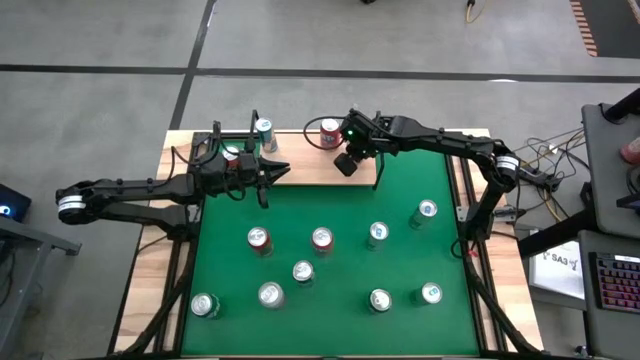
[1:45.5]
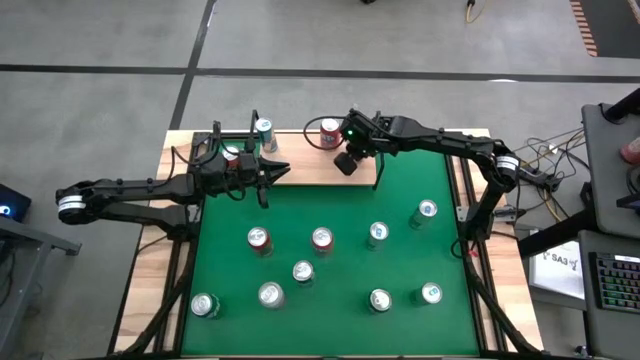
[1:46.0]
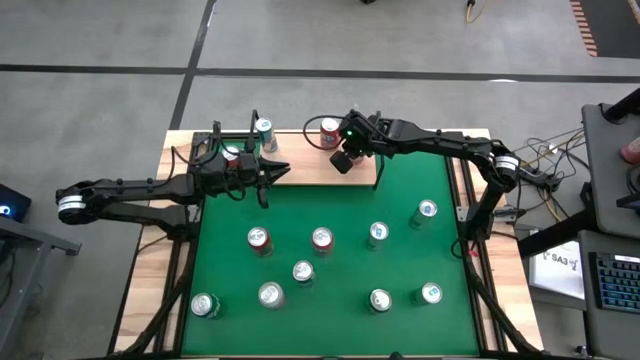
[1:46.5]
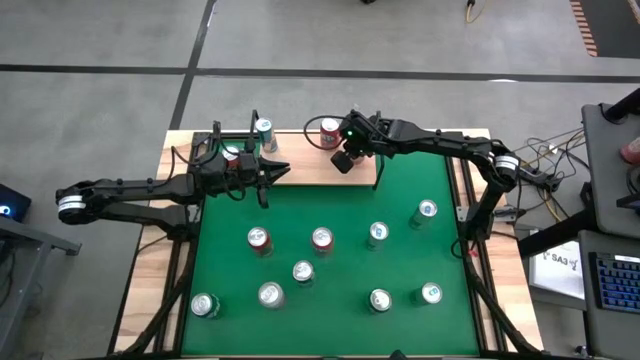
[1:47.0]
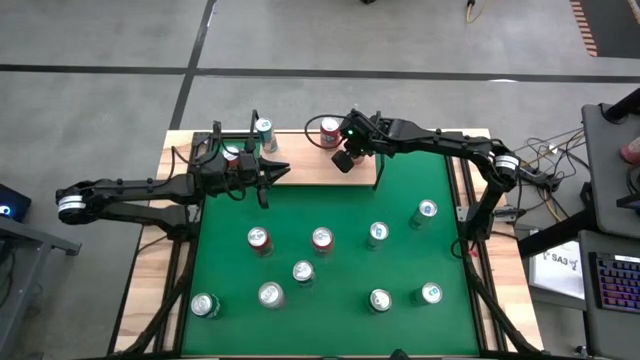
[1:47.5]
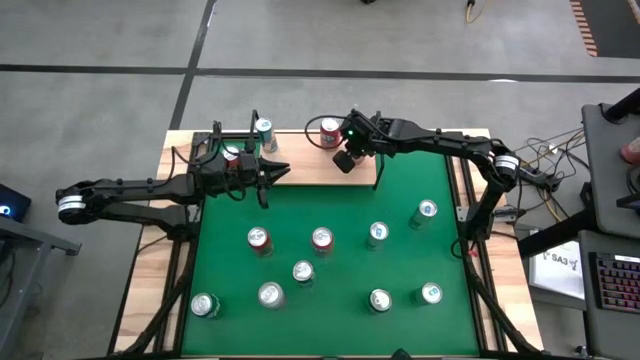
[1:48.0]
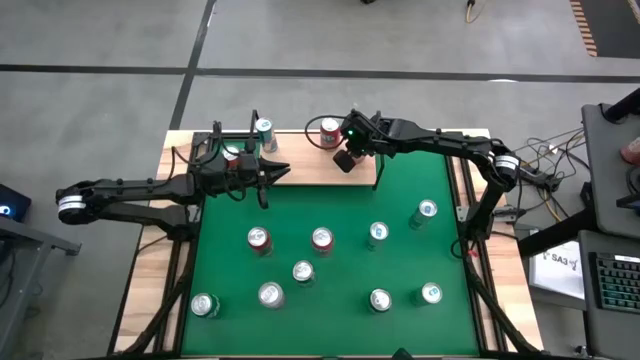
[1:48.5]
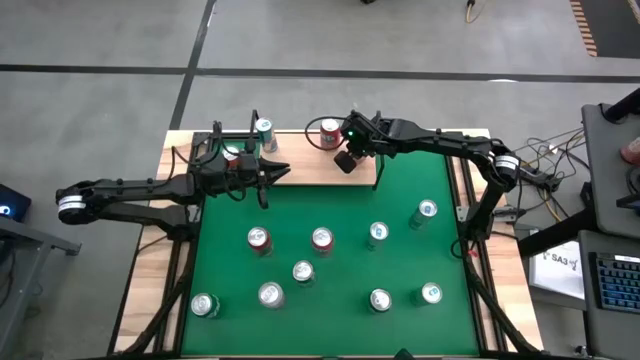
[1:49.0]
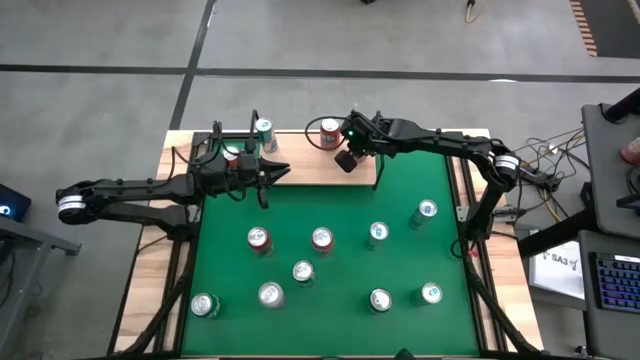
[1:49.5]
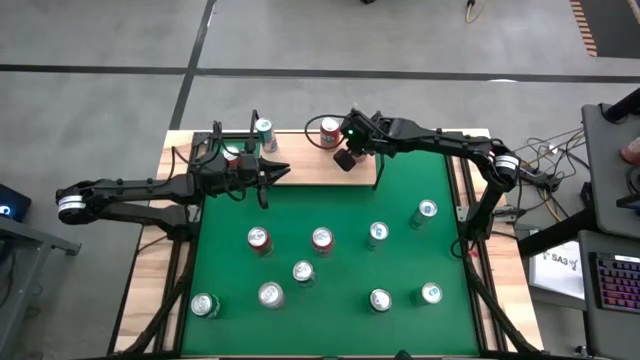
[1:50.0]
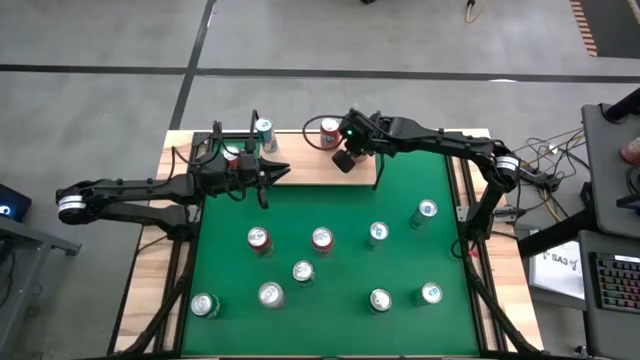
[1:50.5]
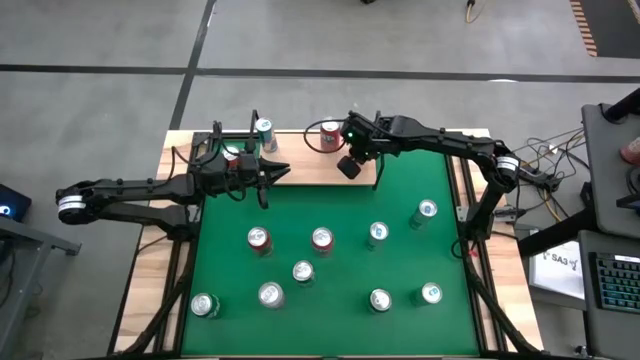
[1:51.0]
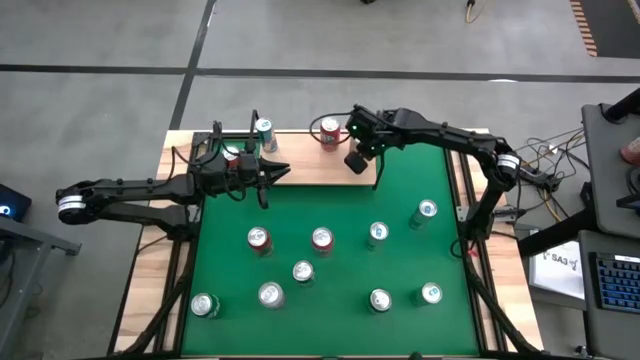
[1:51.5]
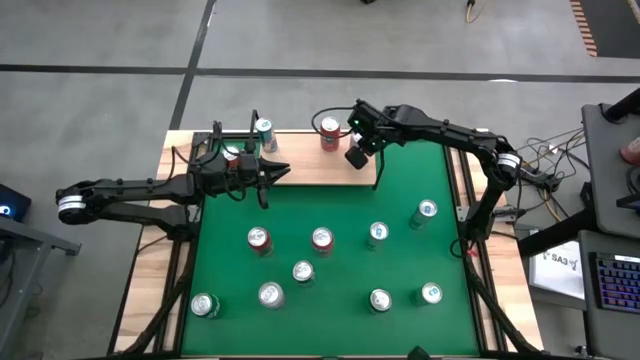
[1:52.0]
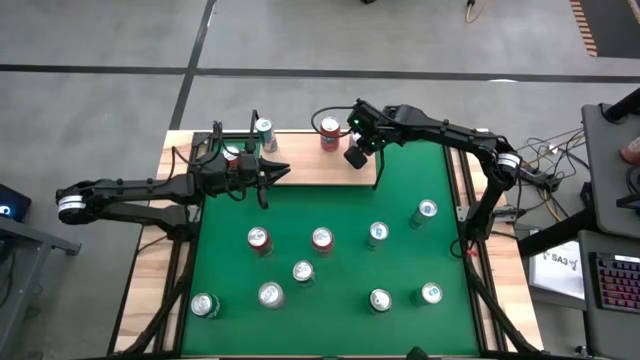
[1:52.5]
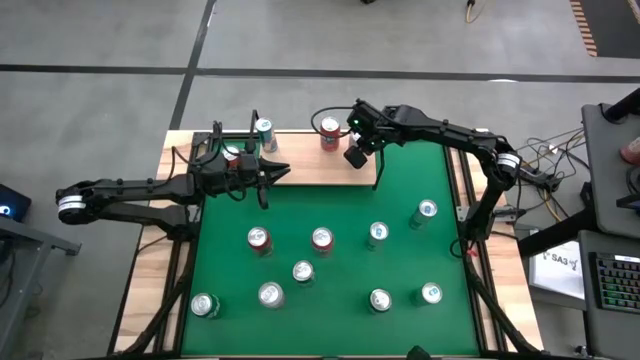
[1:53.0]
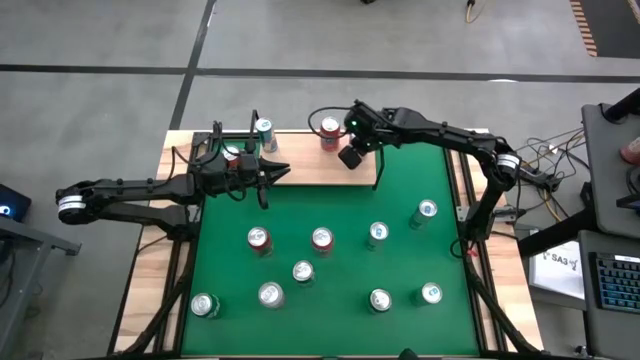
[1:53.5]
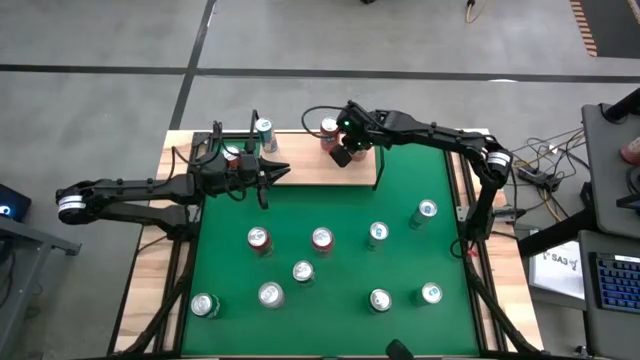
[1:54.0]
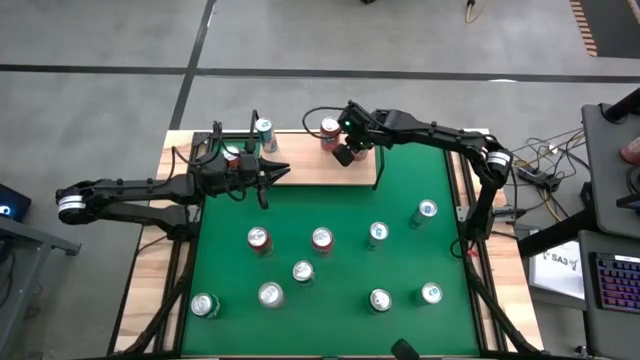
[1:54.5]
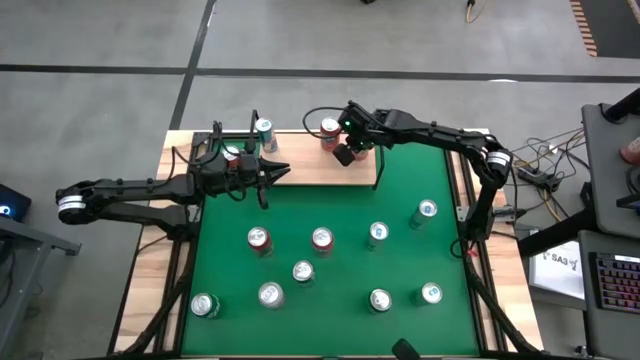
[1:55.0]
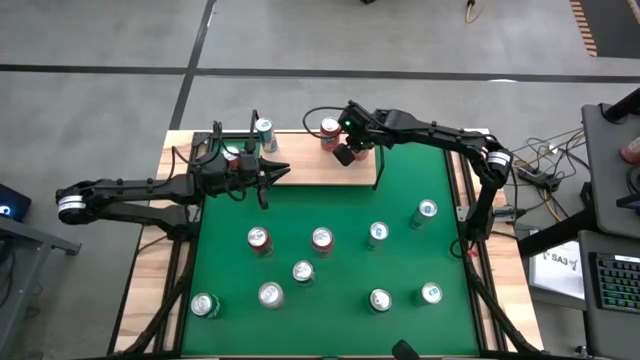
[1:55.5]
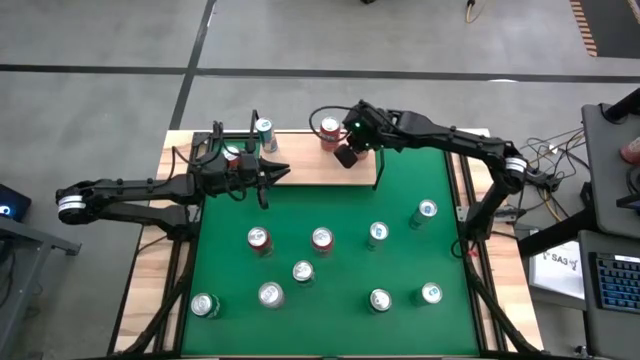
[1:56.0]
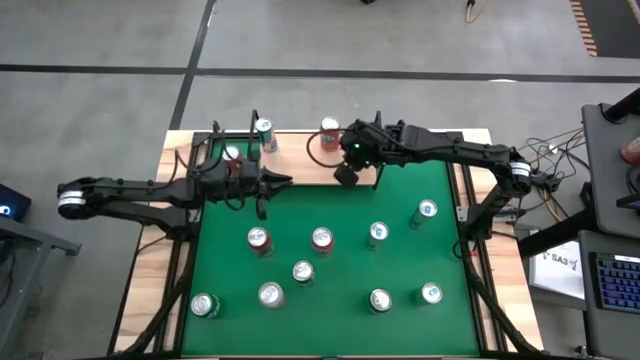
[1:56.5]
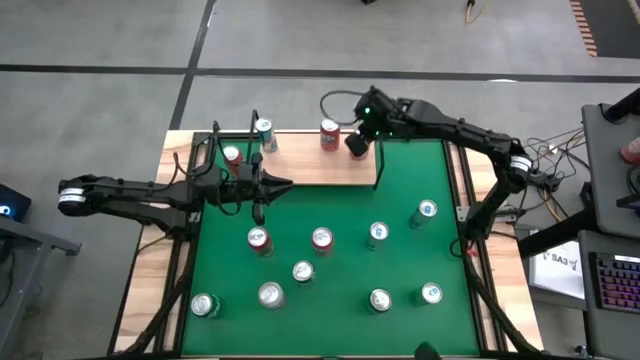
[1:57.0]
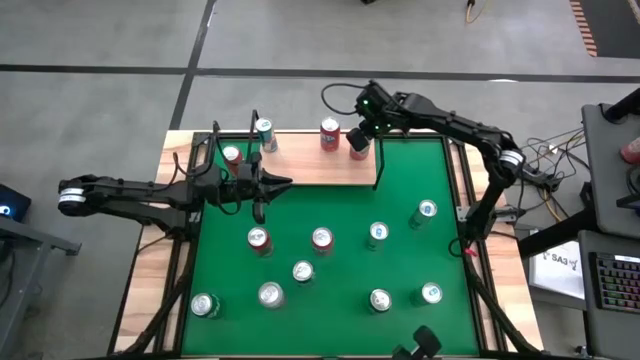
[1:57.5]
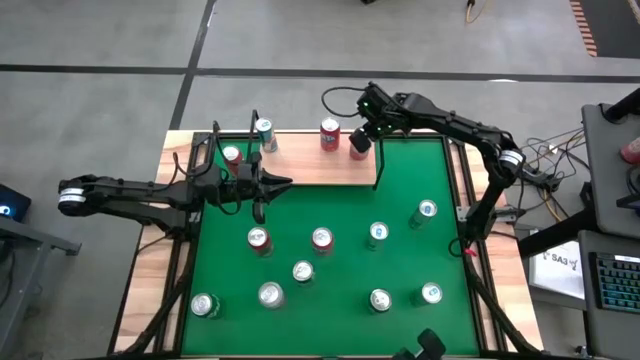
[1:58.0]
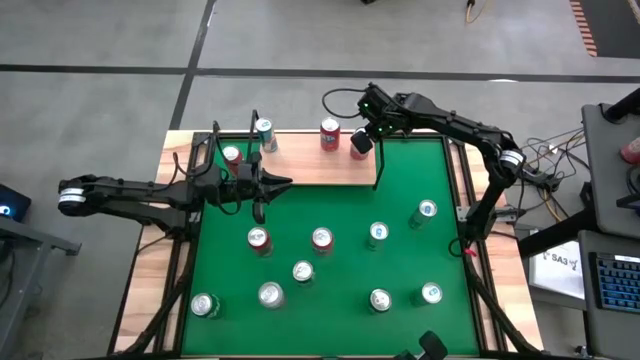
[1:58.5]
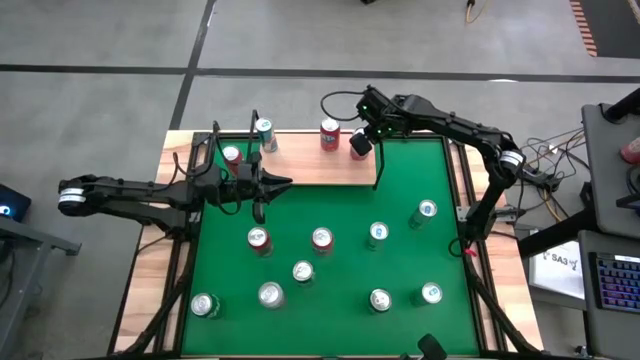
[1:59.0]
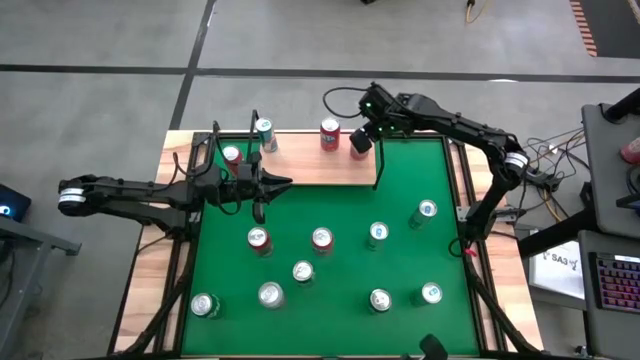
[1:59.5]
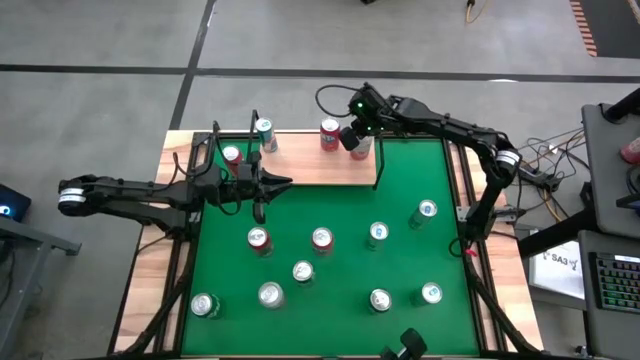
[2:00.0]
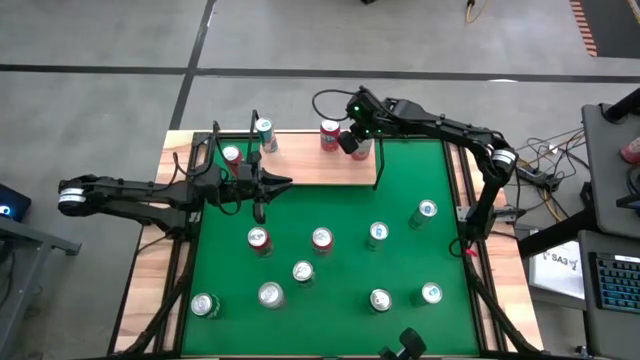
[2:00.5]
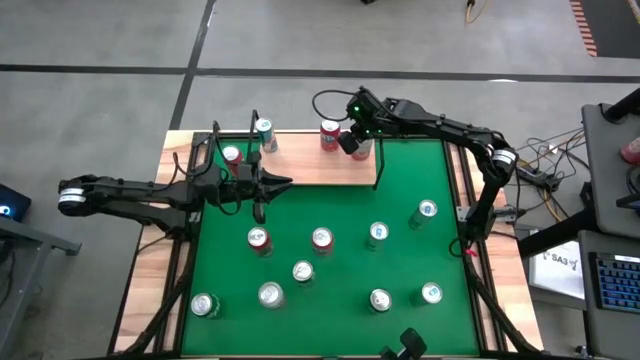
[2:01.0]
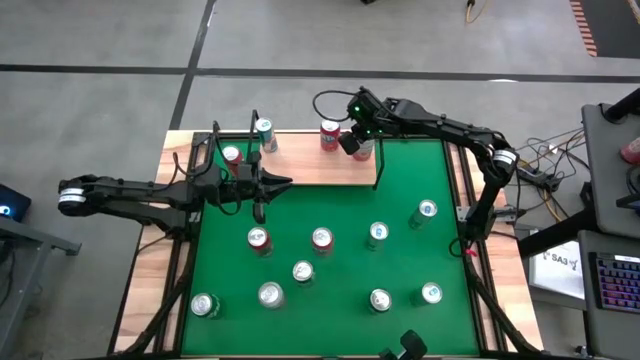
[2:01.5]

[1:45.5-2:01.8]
Task: Pick and place cans onto a shelf
Put the right pink white soda can on the shelf

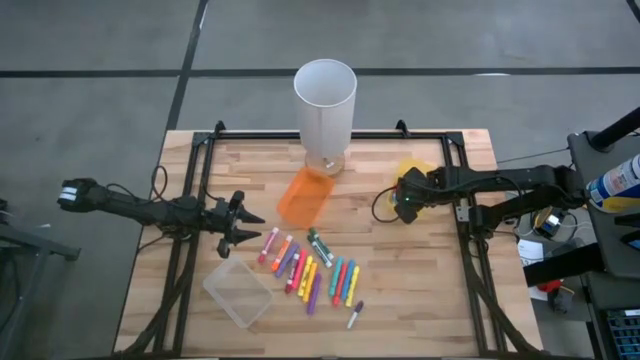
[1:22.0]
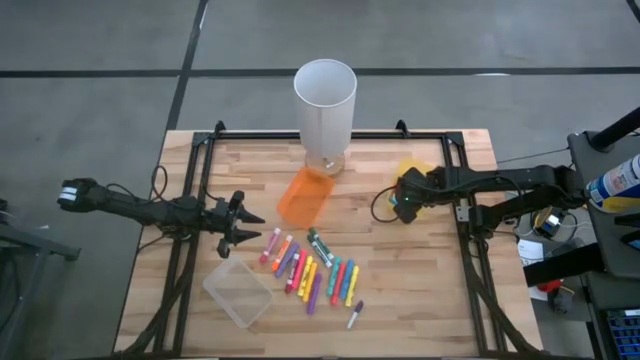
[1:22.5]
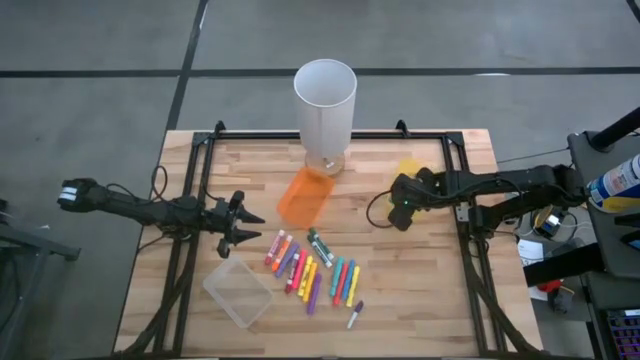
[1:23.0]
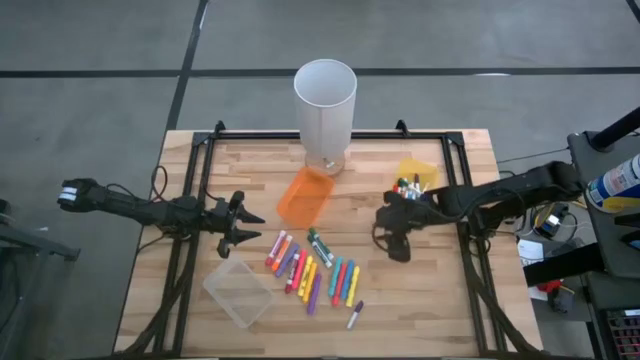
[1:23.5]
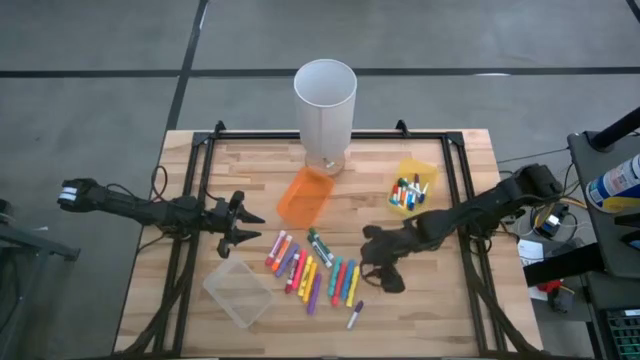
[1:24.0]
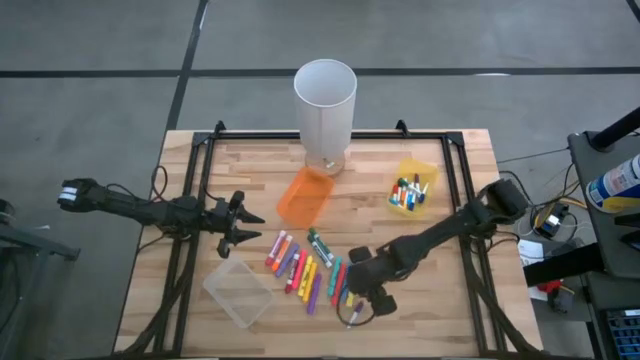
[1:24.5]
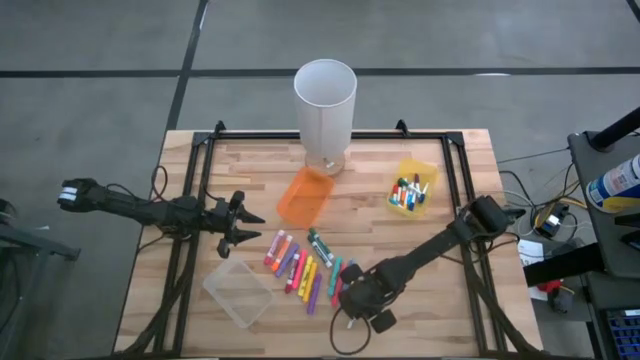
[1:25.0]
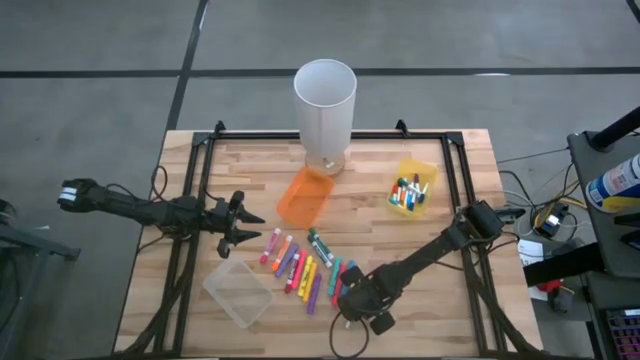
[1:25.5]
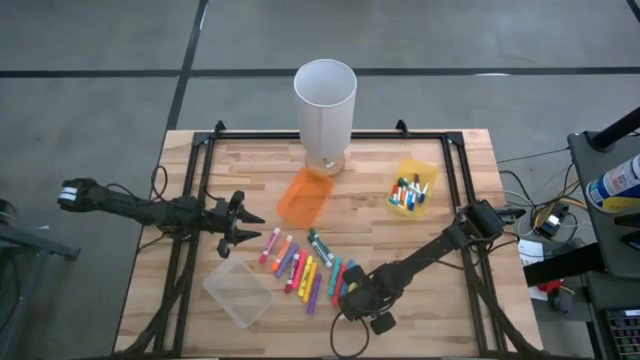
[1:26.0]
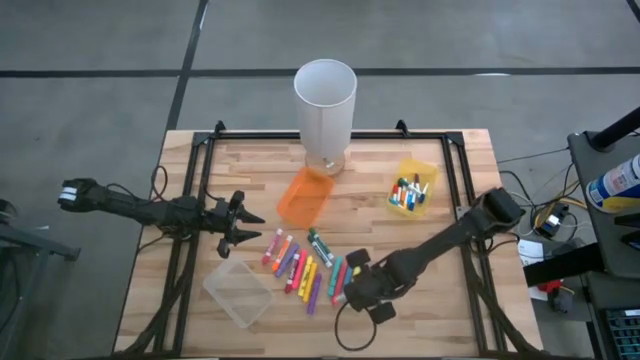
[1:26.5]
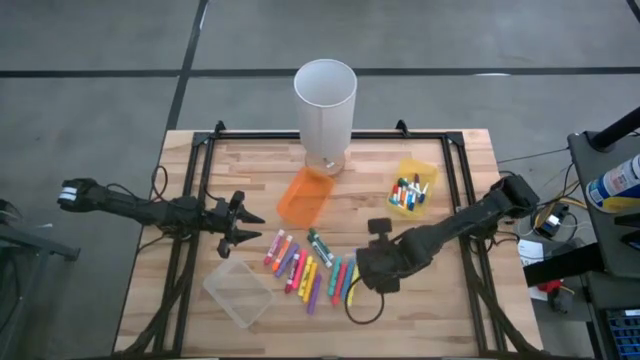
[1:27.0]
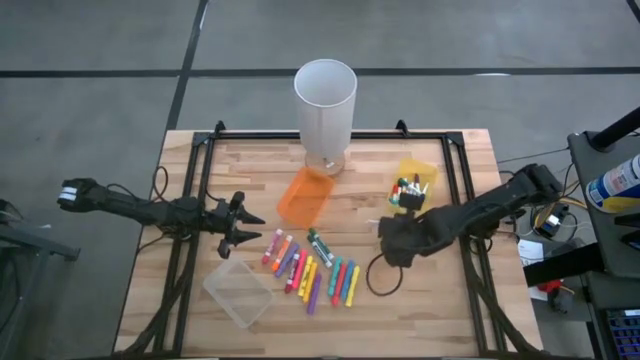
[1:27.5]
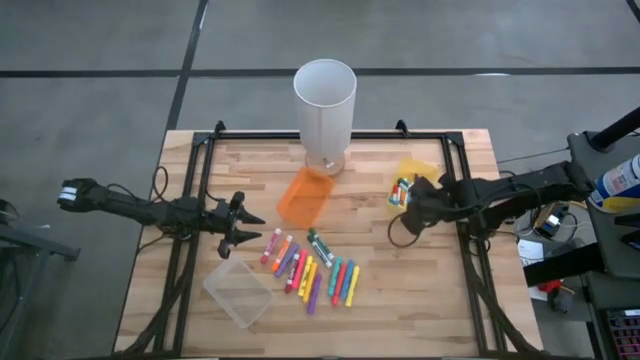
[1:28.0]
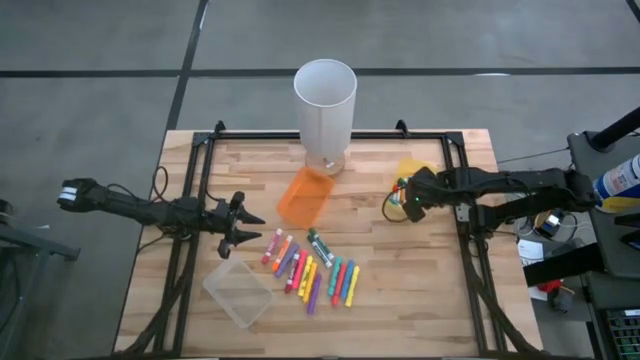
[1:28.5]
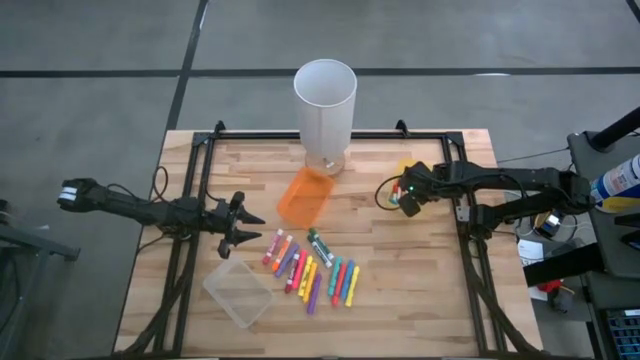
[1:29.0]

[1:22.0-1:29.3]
Task: Pick & Place Markers
Put the small purple marker pen into the yellow bin
